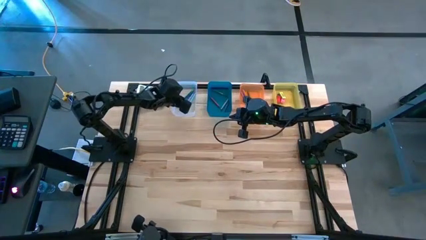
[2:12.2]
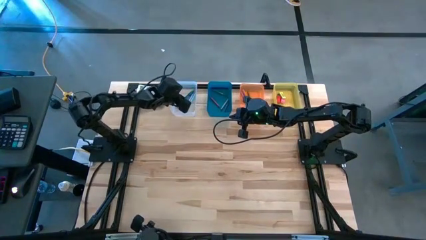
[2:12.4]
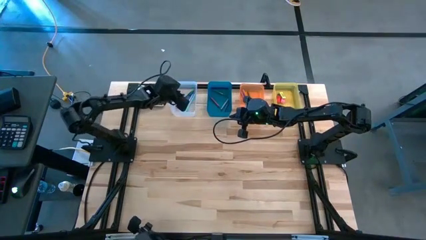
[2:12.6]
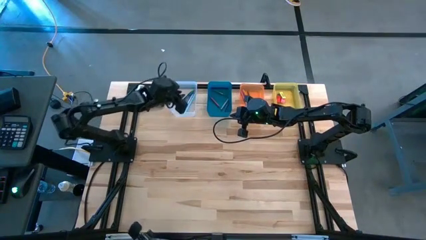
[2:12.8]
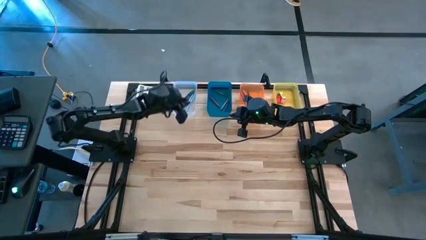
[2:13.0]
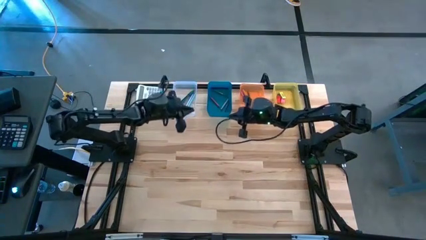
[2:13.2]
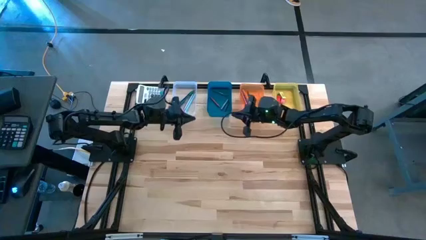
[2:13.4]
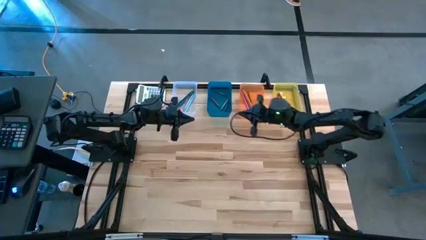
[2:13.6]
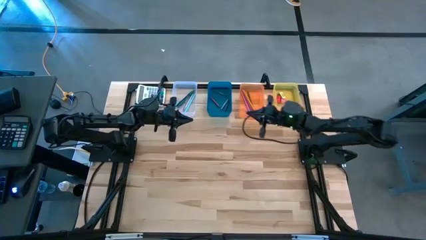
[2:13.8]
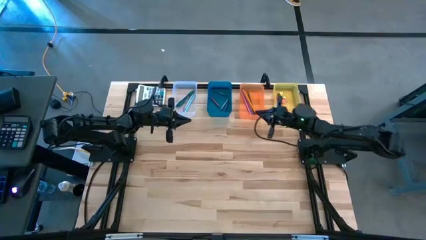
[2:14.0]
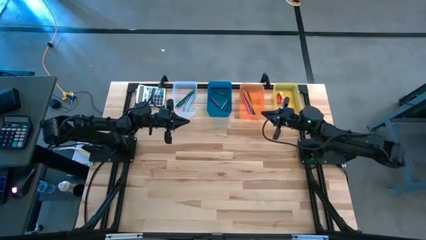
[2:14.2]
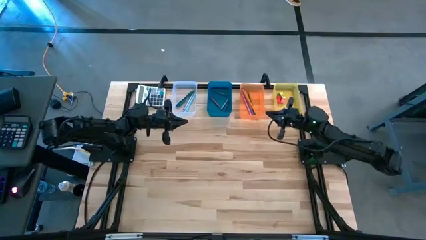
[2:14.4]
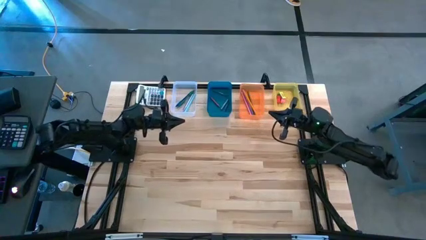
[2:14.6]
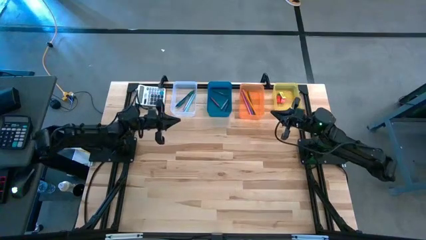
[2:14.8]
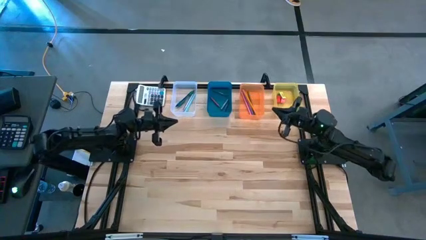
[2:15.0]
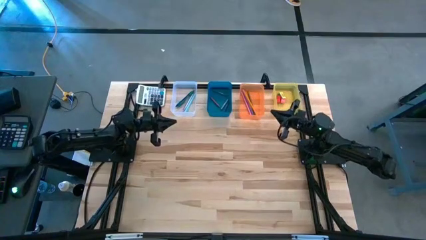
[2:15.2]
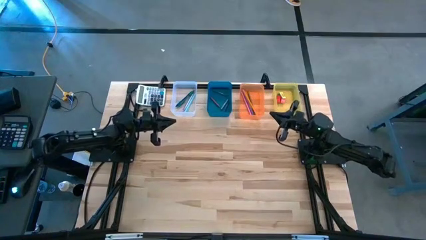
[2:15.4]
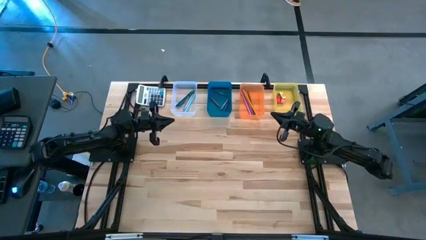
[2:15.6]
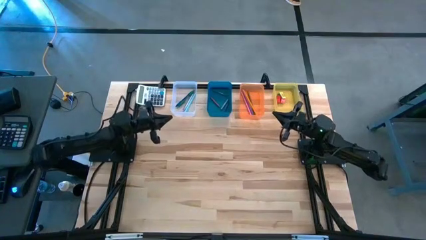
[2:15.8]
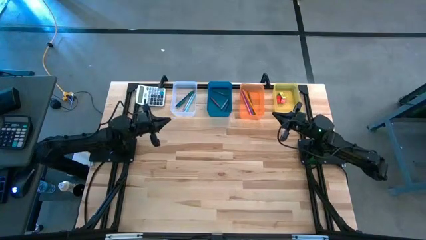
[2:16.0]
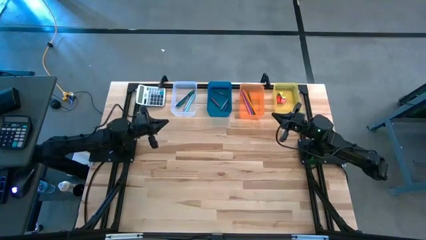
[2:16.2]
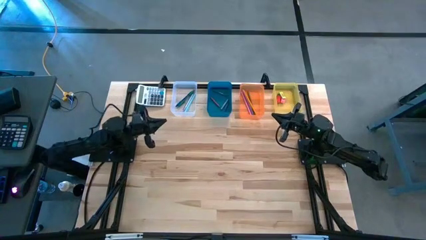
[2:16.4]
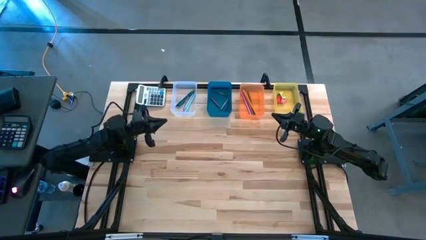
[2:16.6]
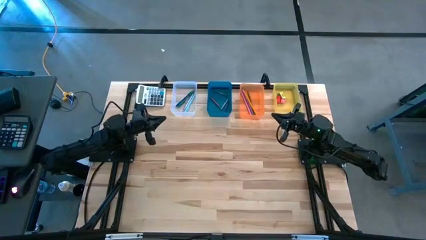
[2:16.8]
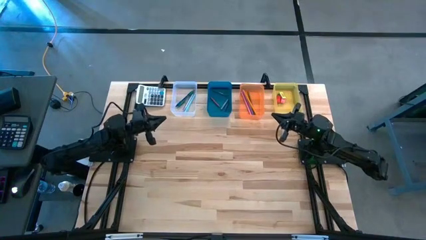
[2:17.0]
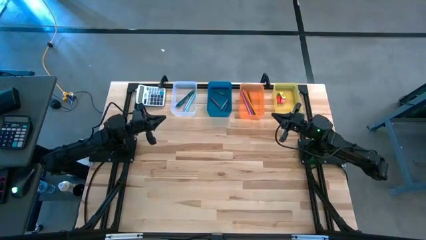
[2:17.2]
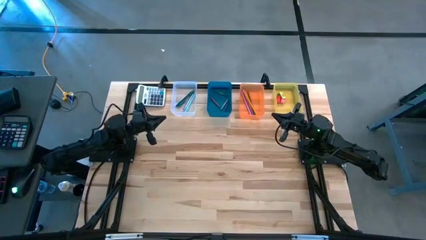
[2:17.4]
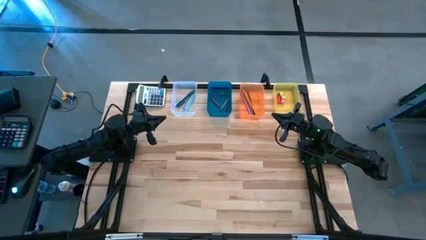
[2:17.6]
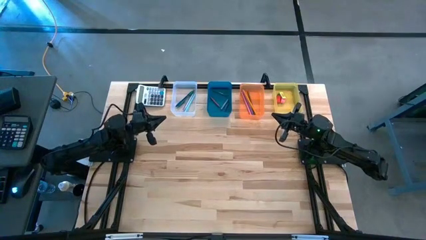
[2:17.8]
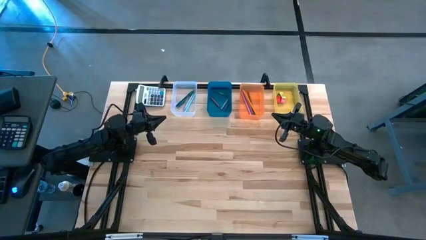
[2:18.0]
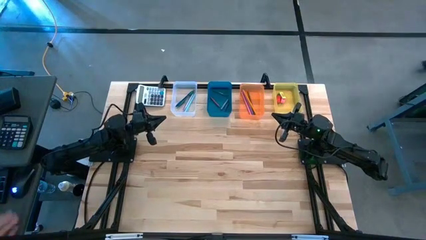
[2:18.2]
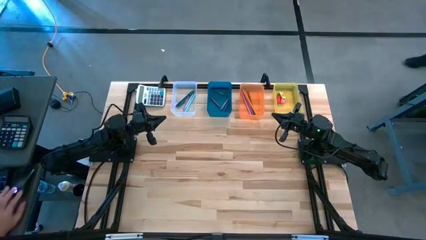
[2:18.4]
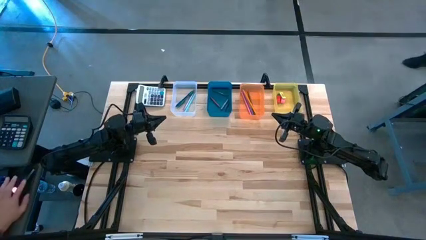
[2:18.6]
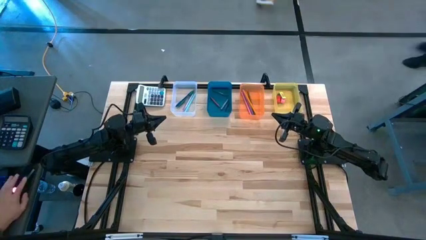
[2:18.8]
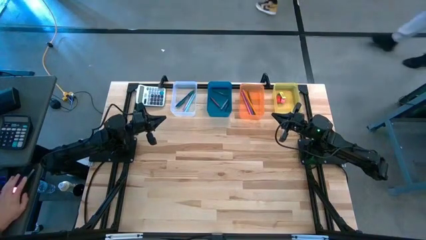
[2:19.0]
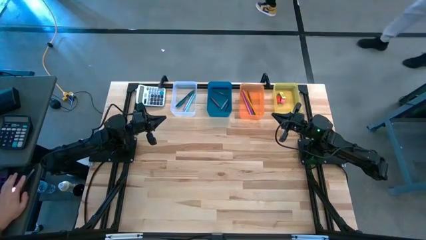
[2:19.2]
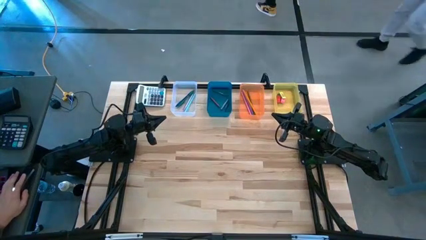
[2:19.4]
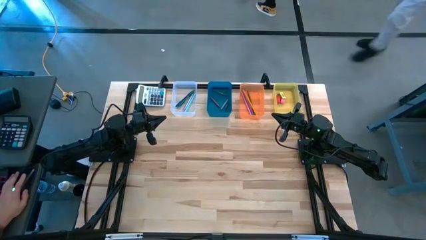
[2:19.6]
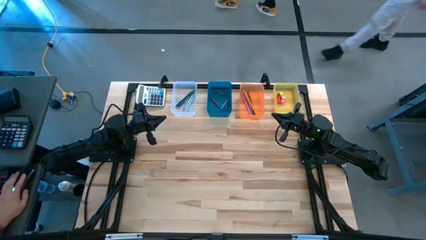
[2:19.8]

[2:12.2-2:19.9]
Task: Sort crayons/erasers/pens/pencils in bins
Return to Home Position

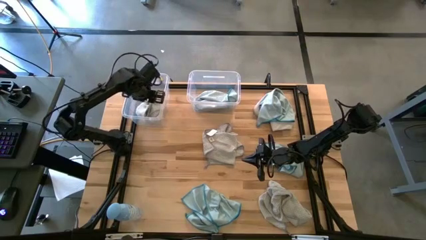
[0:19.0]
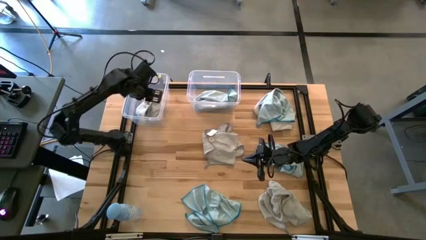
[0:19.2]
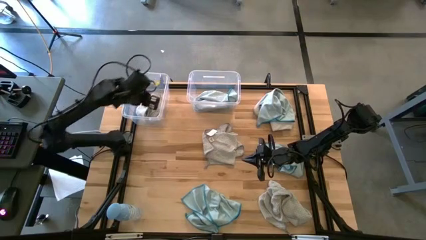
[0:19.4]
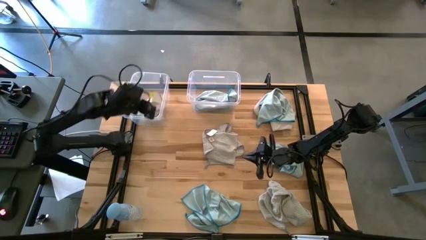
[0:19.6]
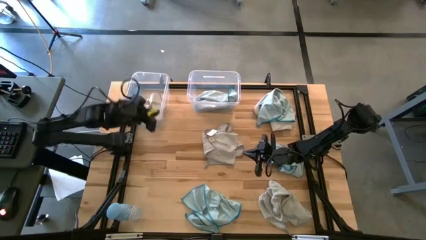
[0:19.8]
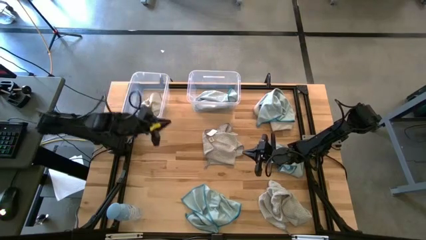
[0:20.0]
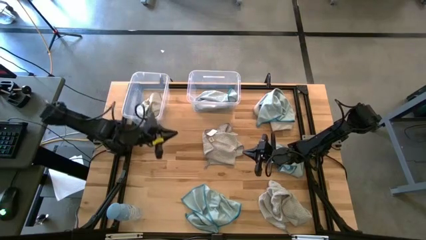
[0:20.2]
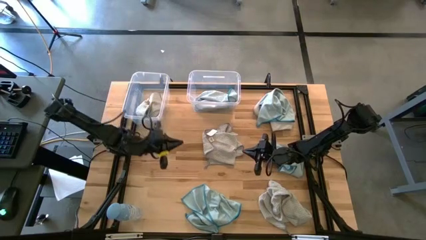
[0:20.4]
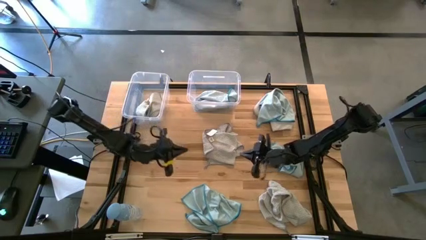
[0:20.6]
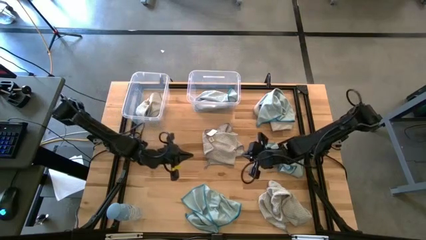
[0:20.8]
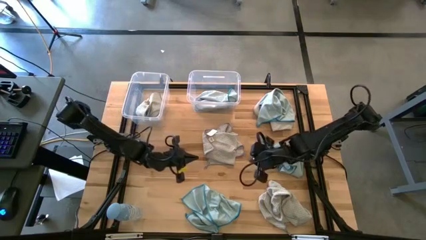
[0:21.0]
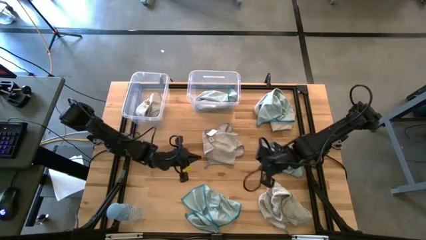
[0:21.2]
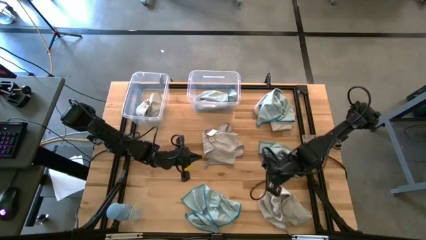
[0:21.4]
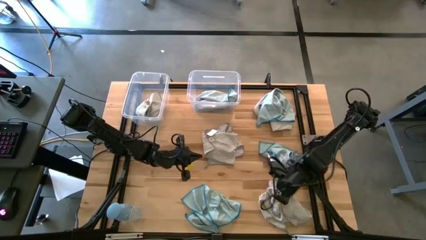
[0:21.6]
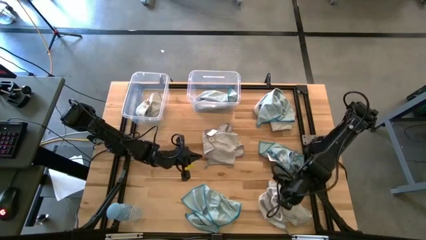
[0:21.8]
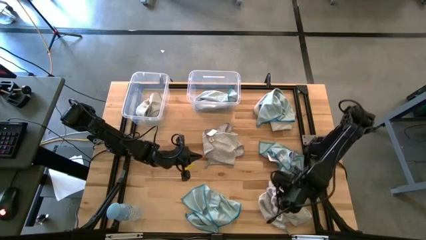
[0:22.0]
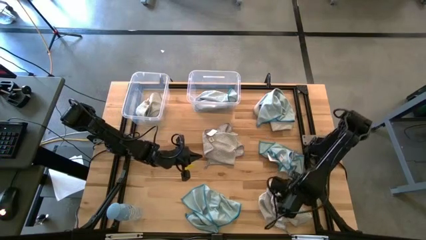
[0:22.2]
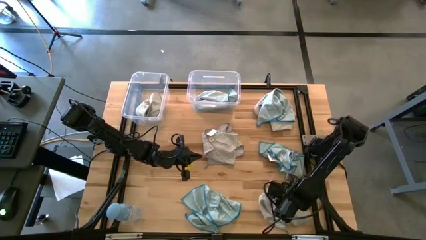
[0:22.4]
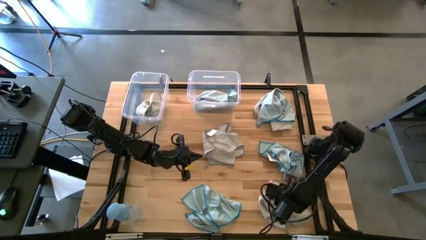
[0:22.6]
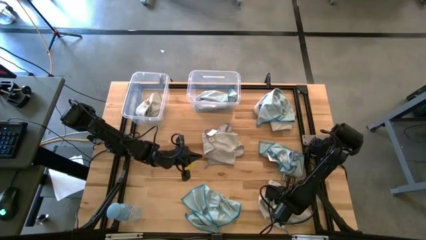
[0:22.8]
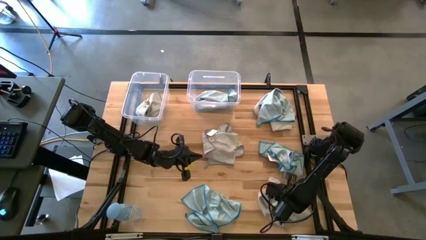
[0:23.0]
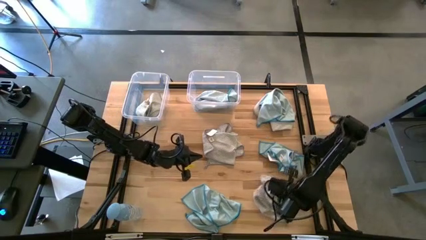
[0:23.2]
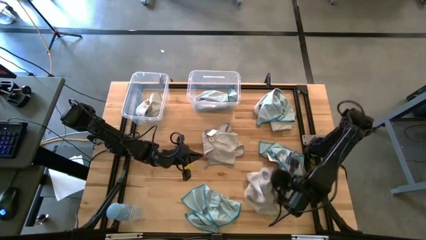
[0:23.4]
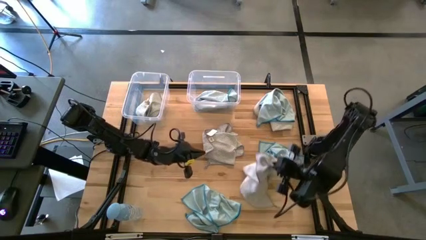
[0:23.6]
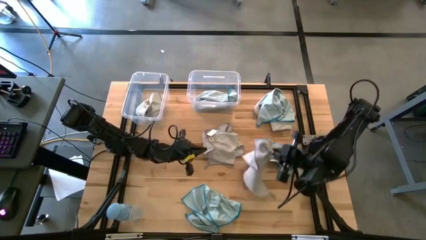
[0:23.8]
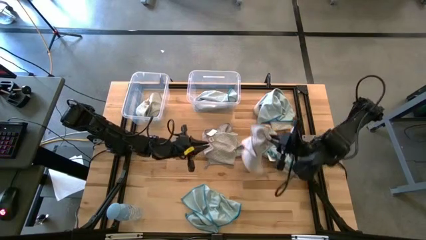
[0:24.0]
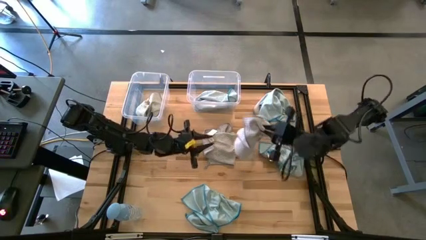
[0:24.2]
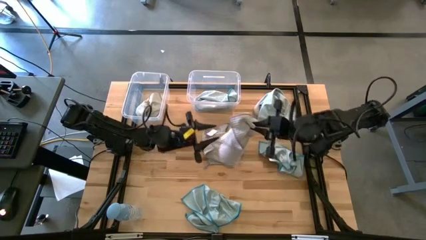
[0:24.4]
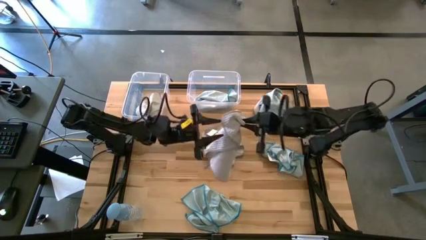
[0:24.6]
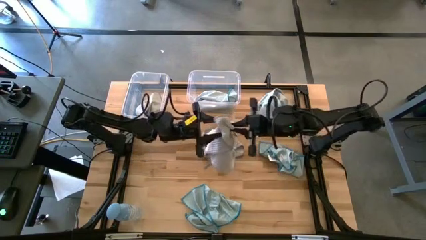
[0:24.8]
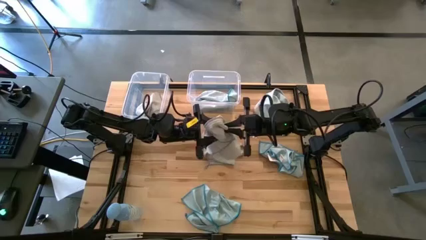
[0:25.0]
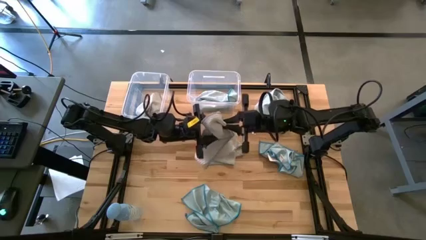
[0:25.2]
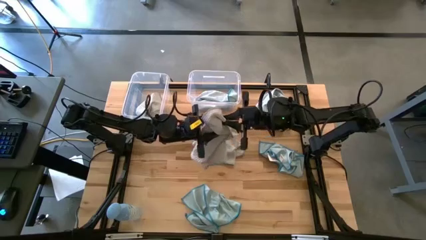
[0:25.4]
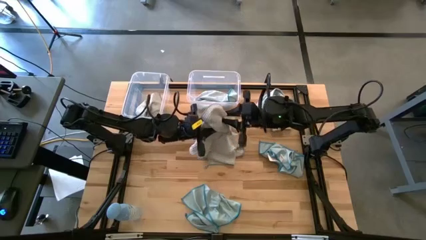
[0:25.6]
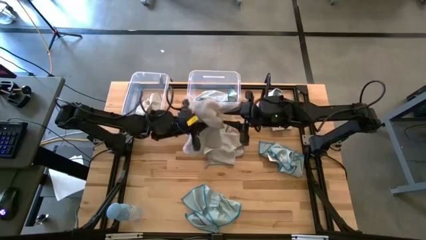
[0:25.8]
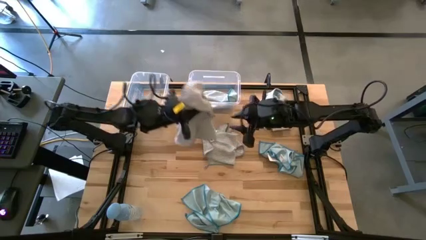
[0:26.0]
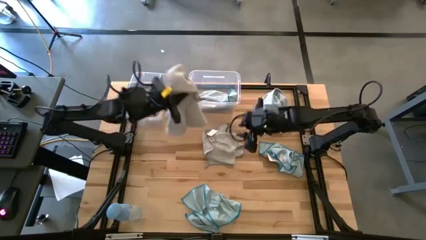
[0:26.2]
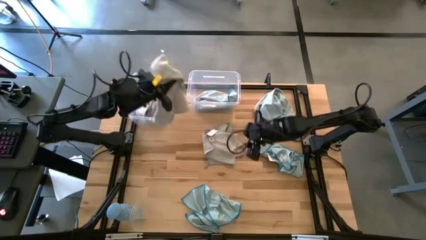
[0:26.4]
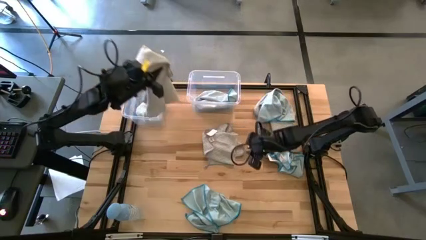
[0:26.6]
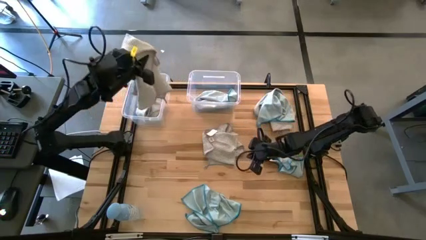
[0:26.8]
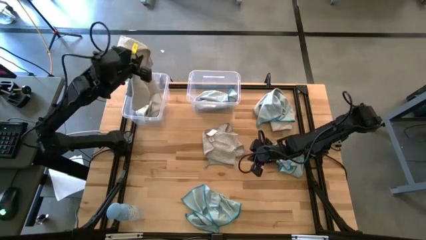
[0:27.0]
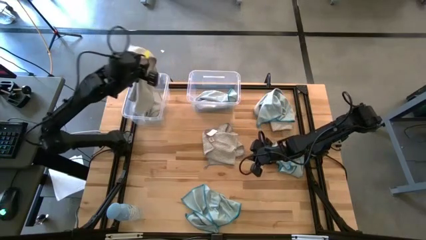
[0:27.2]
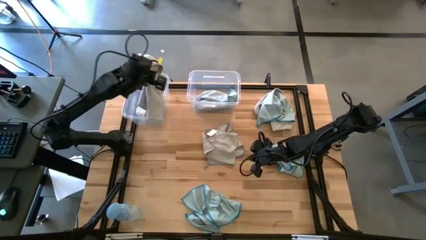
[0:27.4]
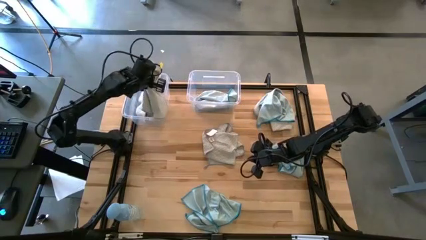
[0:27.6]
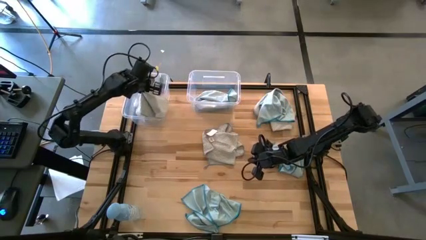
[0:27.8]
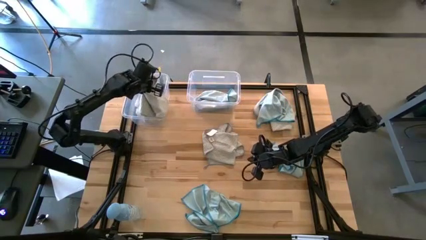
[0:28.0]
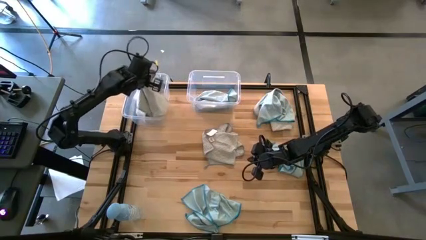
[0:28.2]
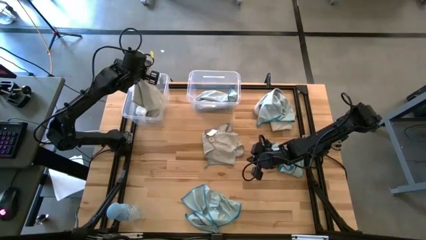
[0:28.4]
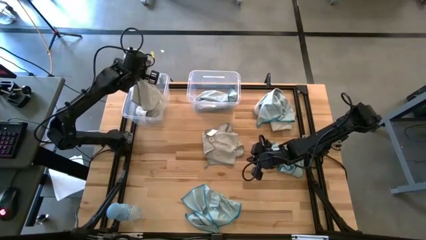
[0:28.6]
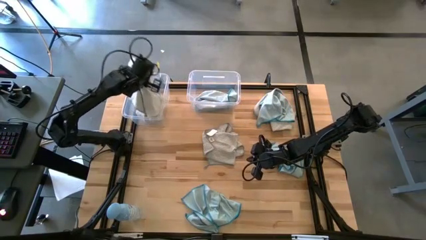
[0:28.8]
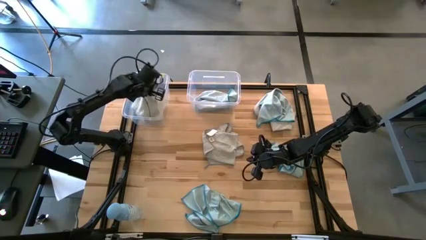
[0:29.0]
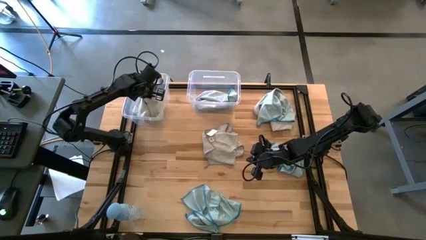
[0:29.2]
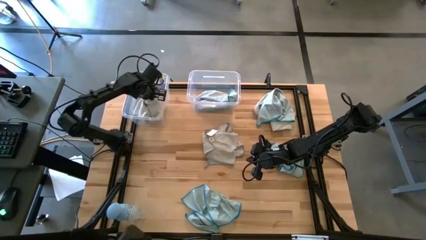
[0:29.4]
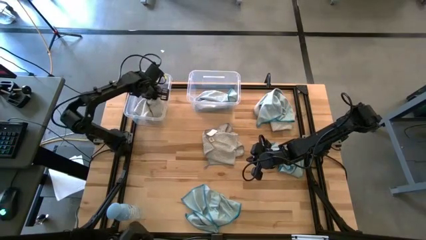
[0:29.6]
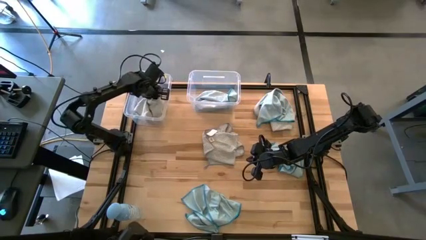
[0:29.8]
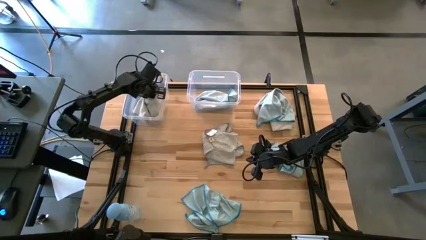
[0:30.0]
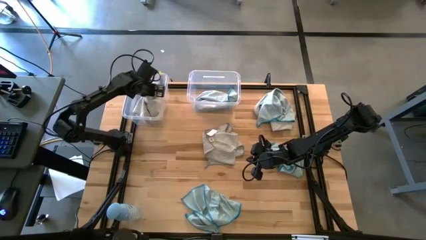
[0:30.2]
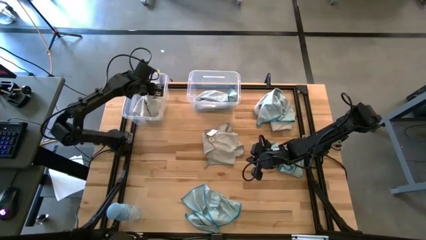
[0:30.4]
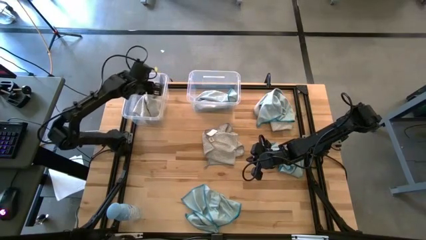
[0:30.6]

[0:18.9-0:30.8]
Task: Sort microfiber towel by color & place in baskets
Put the bottom right brown microfiber cloth into the left transparent bin
